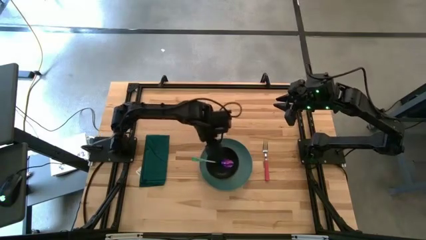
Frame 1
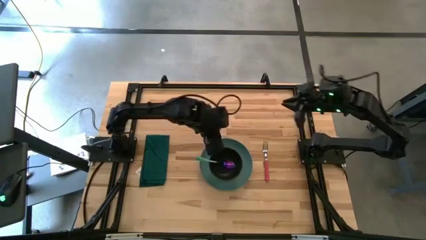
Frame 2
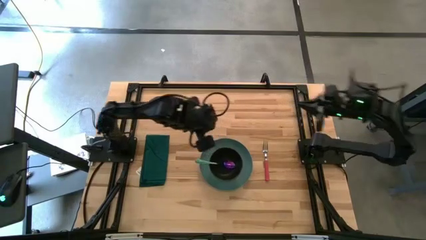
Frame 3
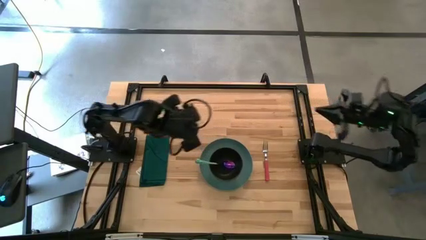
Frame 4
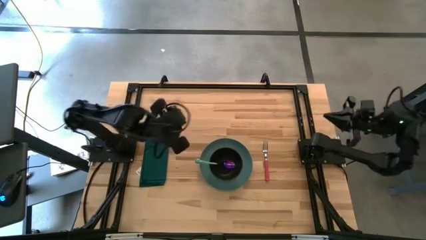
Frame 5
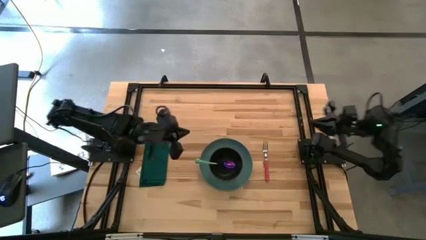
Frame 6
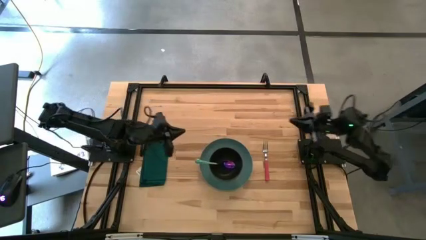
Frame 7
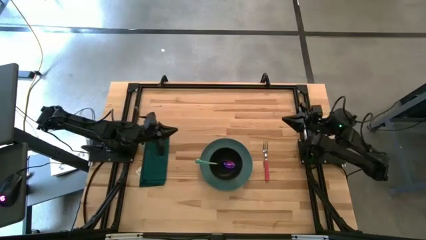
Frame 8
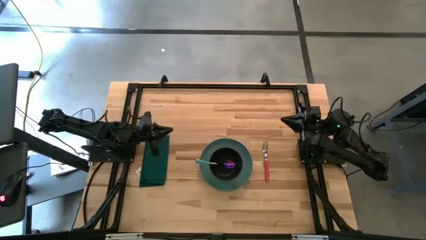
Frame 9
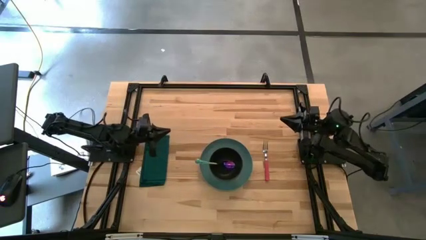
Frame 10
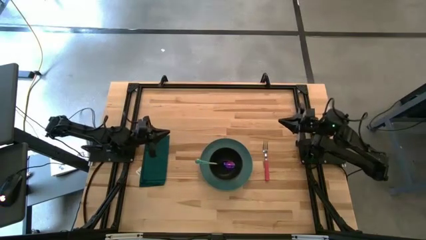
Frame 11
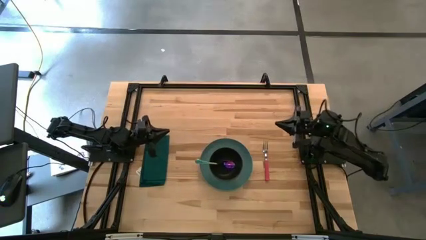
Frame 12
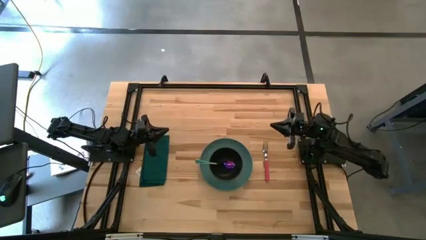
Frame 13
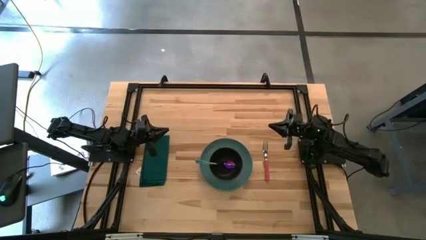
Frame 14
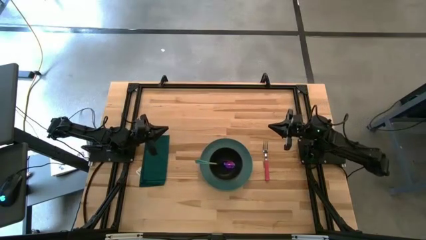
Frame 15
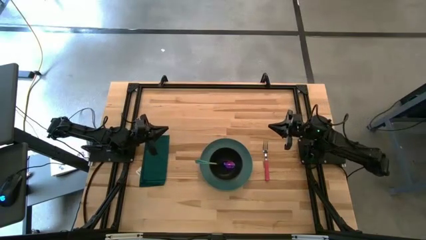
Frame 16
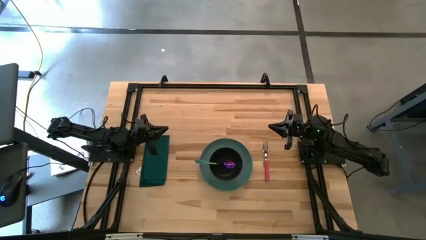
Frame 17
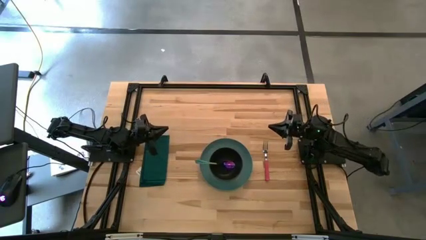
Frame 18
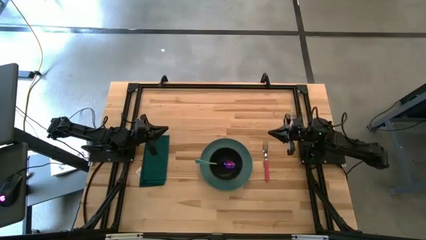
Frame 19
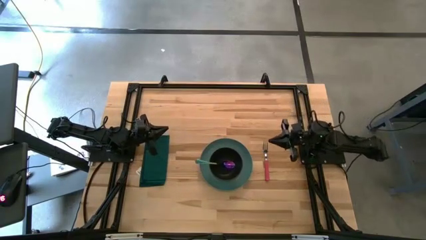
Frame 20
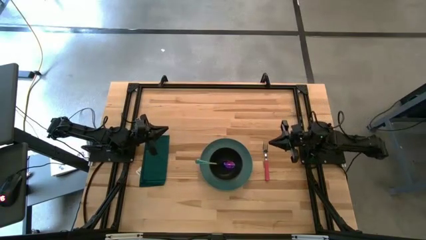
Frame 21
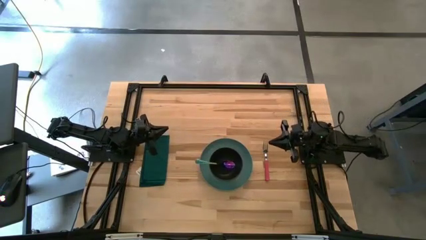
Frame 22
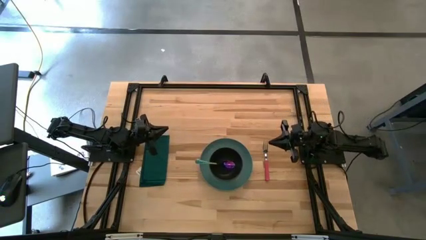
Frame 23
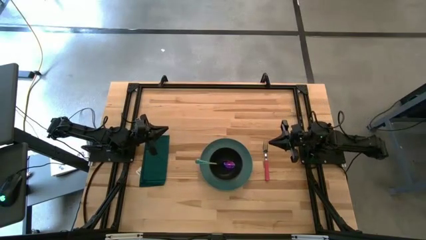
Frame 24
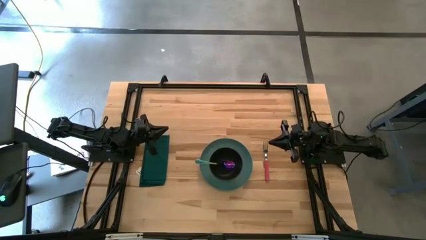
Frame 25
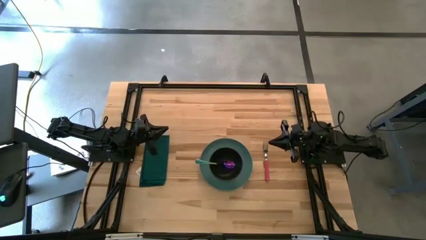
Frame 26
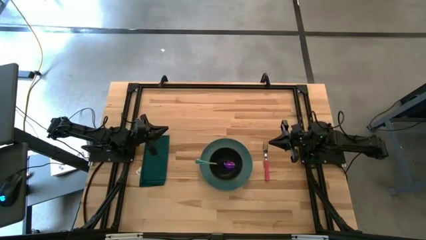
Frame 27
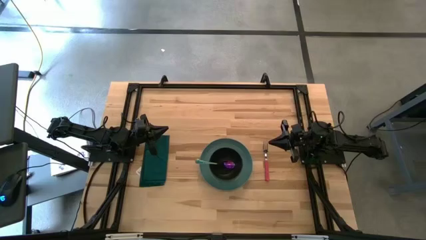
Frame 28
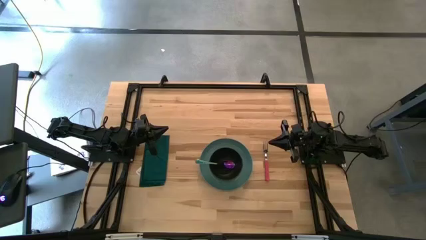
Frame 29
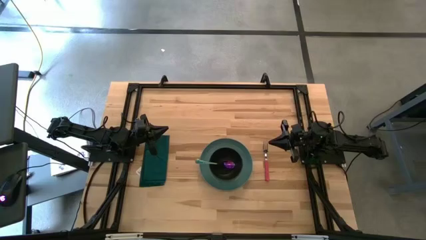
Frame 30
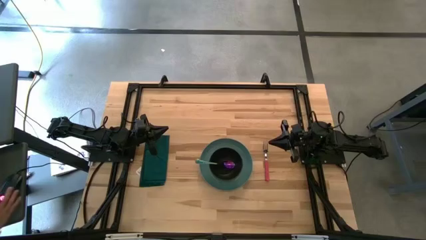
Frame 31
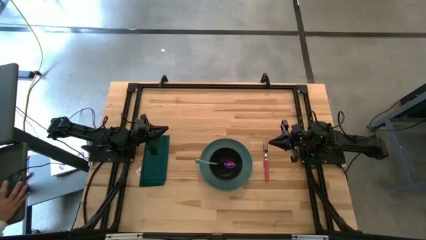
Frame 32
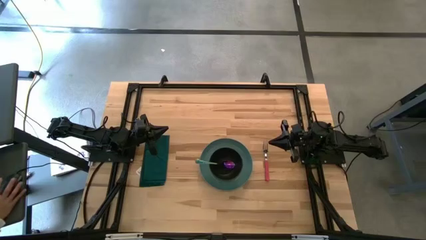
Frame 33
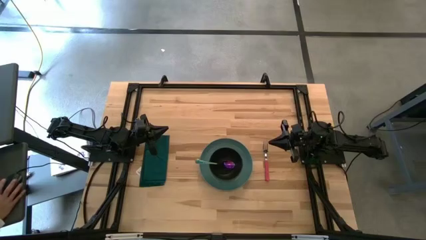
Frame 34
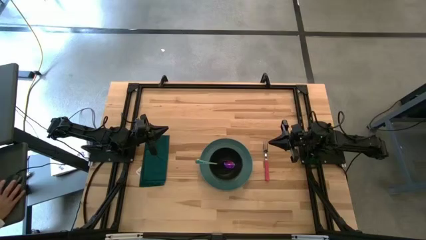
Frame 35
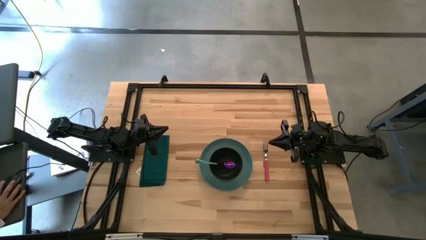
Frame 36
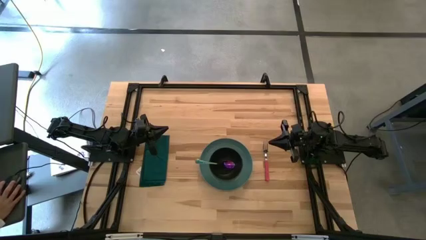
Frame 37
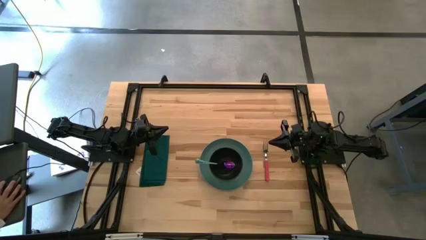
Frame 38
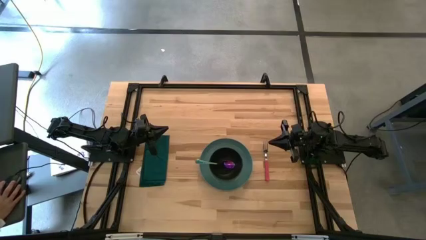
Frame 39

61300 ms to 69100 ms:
Task: Set table place
Return to Home Position

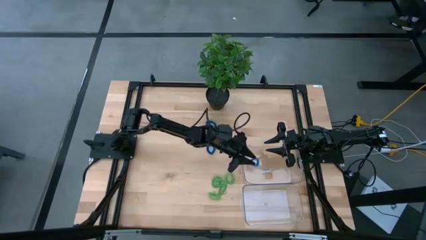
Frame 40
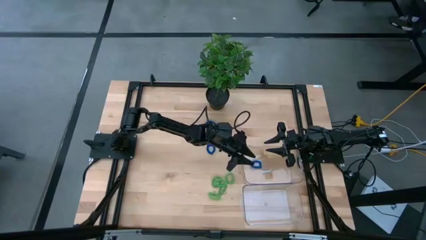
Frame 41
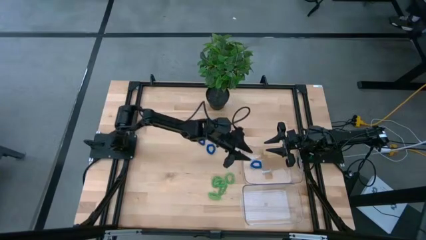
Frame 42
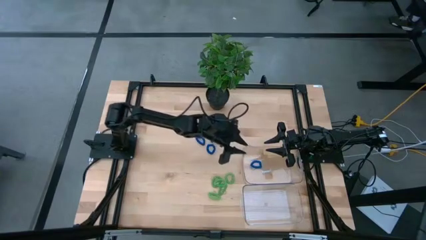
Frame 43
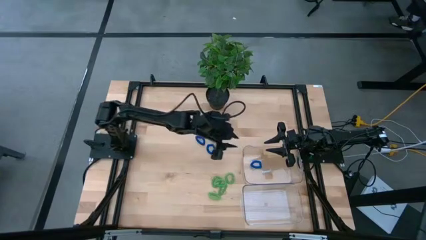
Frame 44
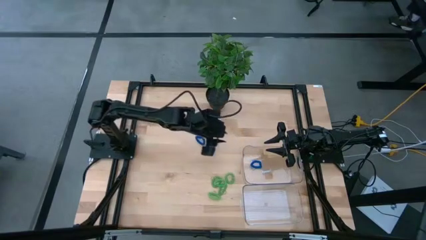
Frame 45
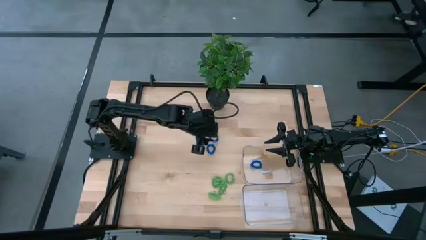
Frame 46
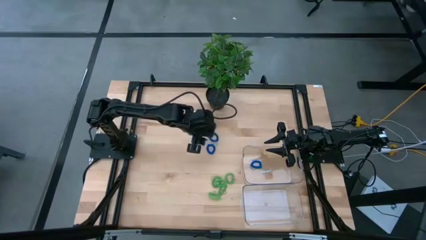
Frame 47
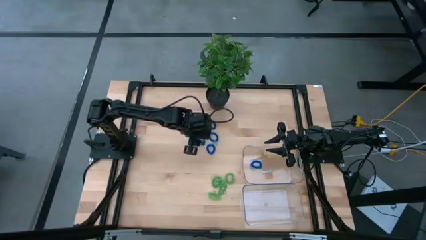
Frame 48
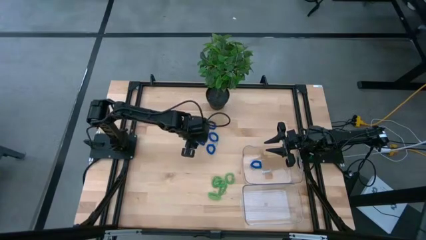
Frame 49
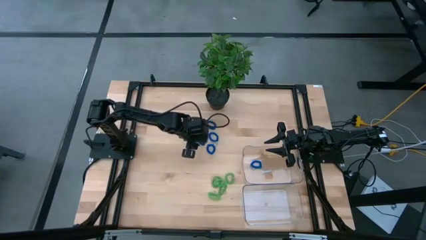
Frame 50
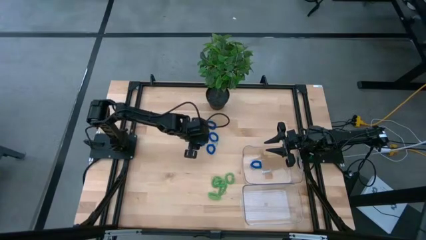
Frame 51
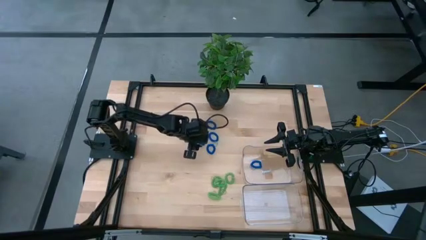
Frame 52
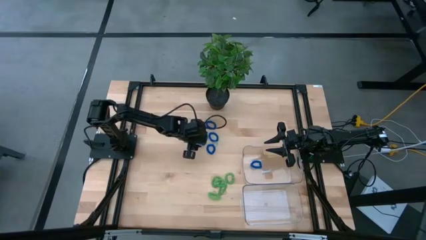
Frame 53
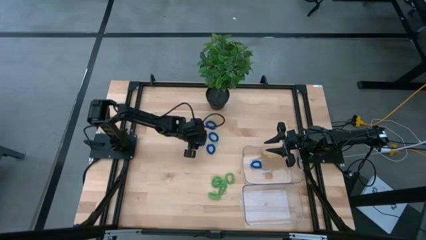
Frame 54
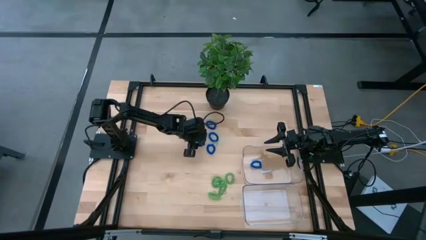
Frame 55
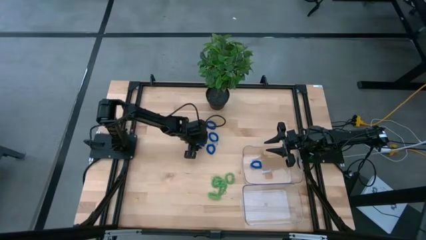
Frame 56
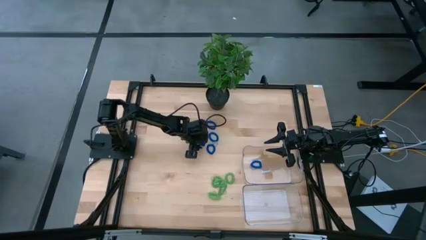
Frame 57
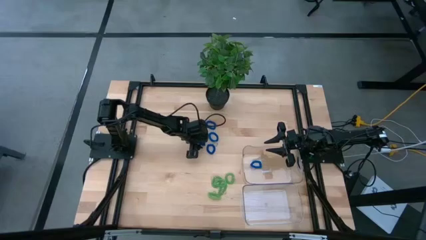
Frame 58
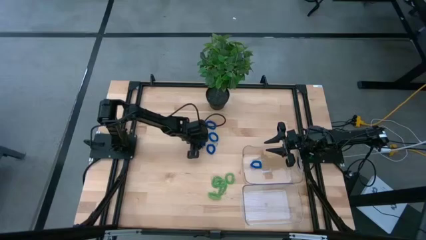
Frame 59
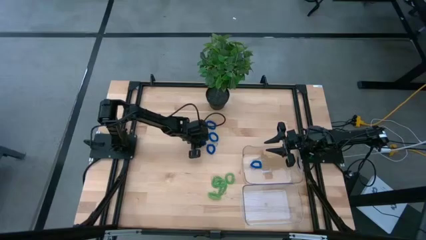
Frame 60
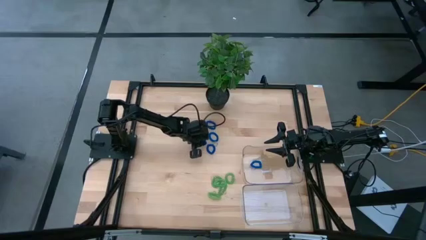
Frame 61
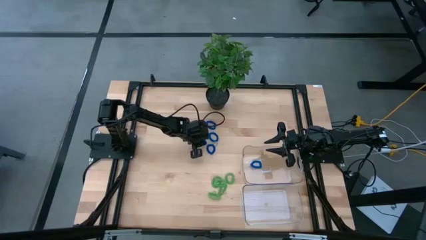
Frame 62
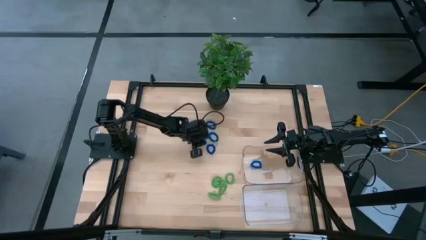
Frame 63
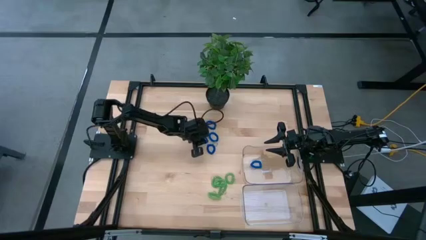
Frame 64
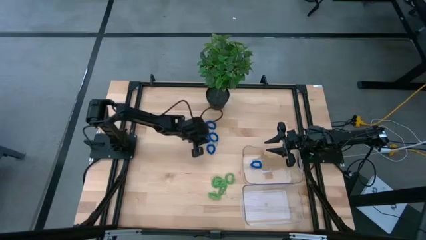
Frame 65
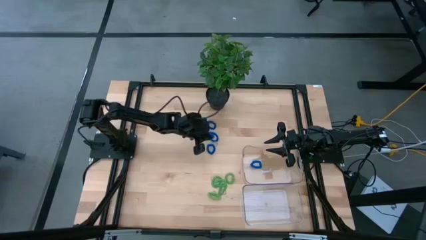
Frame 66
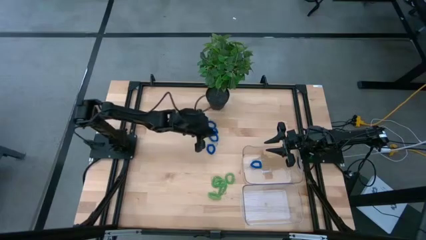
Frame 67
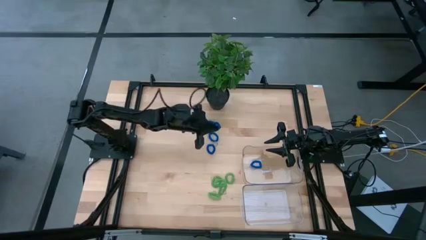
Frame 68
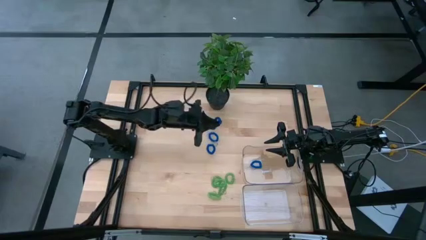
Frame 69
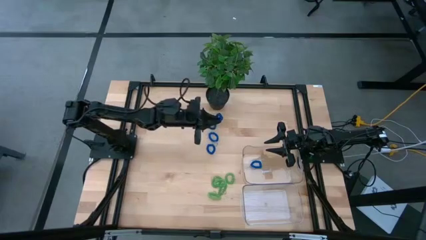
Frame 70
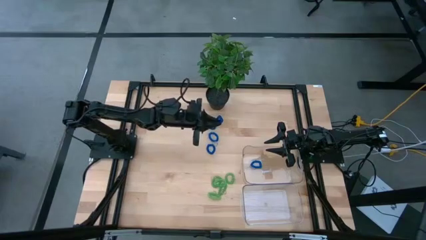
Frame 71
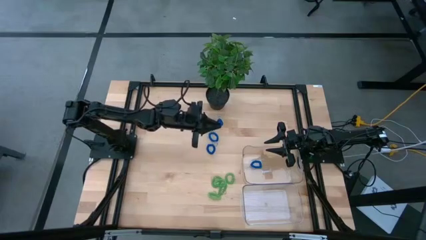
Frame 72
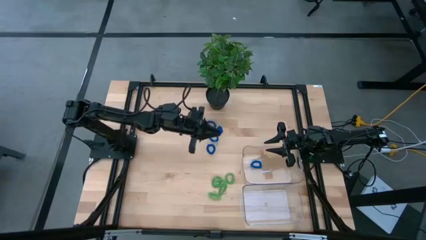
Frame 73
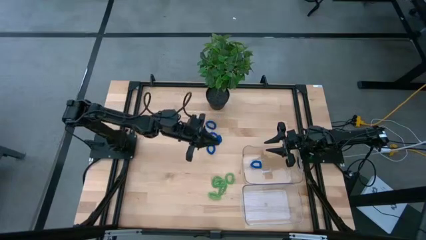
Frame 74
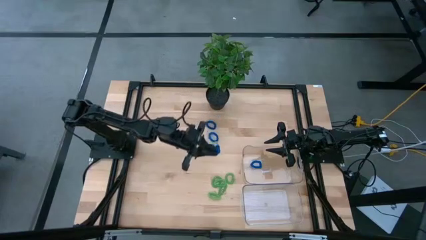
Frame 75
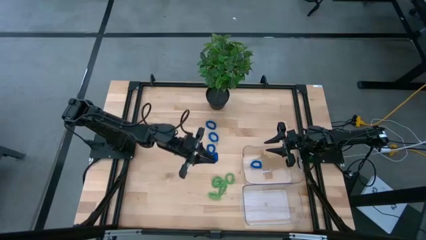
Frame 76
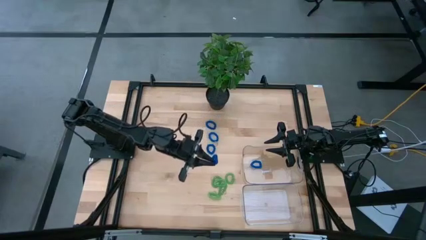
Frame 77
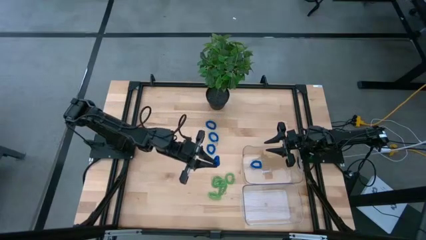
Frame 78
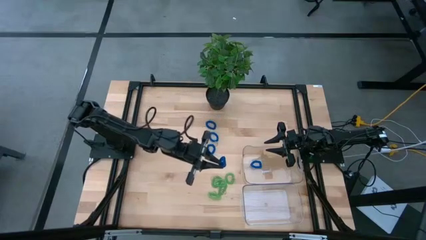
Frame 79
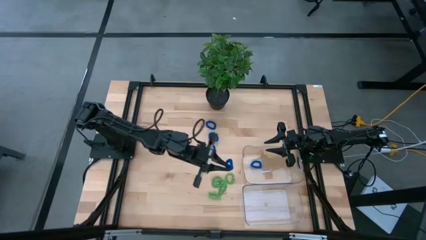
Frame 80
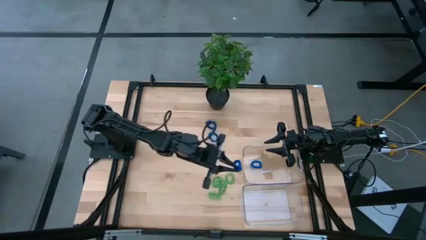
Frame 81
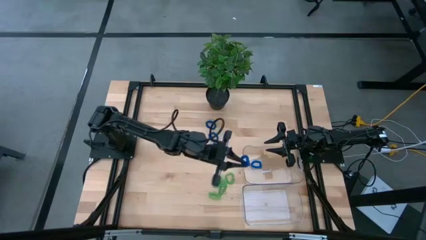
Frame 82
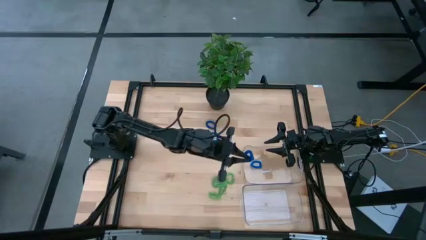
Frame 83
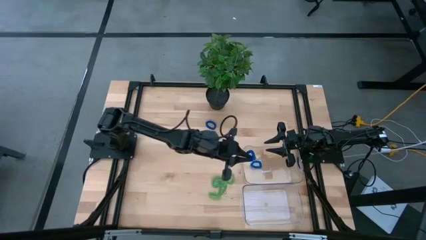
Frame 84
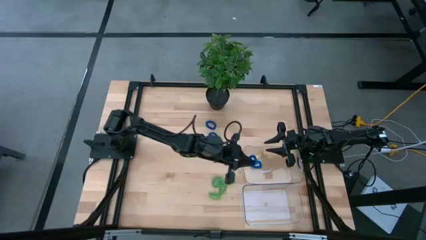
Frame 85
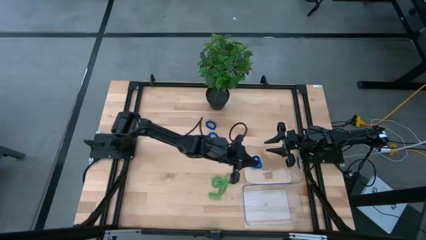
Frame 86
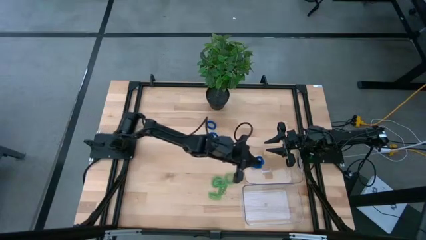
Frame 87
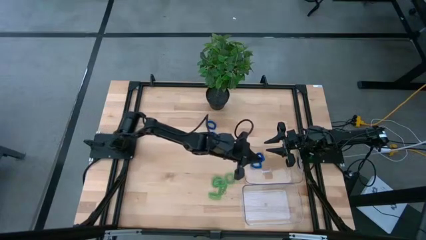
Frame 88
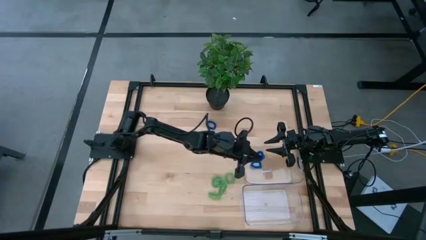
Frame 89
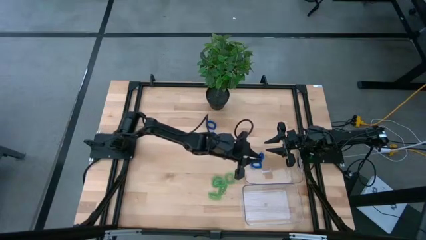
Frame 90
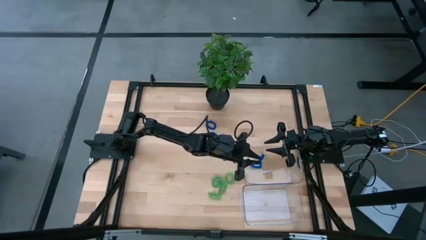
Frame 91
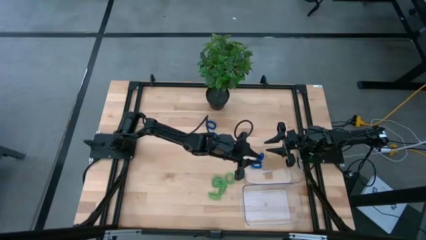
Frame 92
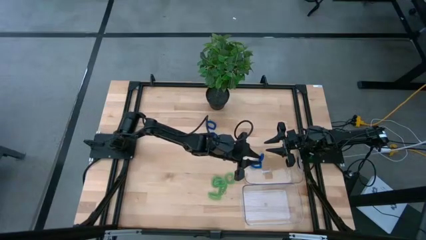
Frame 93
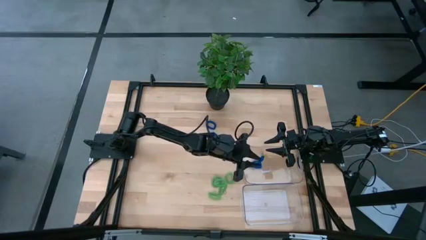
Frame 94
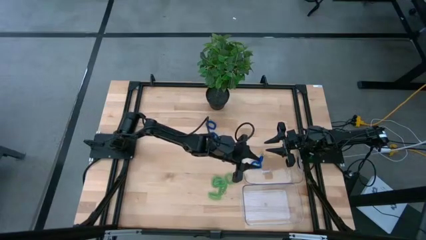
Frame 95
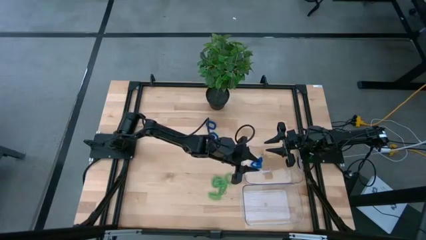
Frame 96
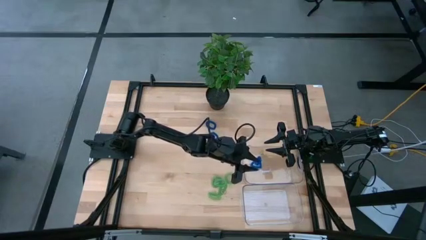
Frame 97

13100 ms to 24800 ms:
Task: Sort spring keychains
Put the blue spring keychain in the top transparent bin
